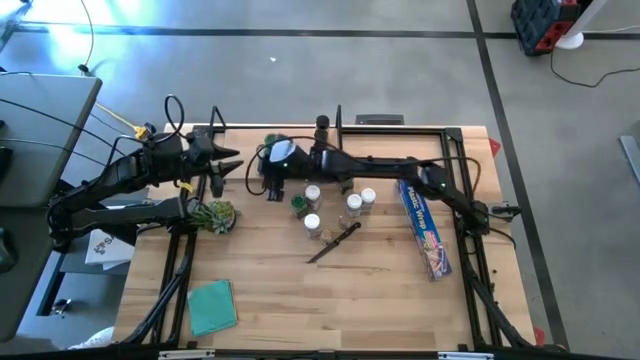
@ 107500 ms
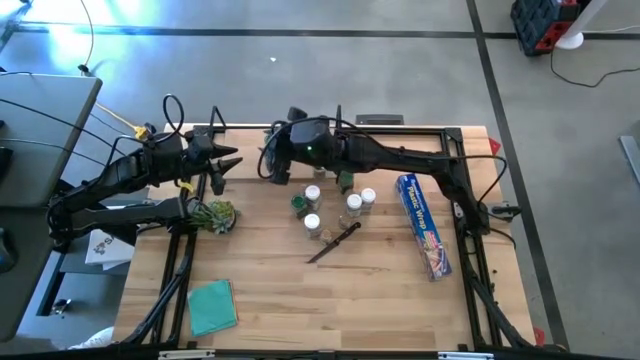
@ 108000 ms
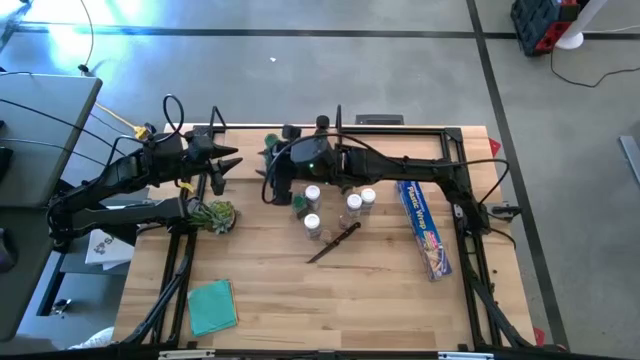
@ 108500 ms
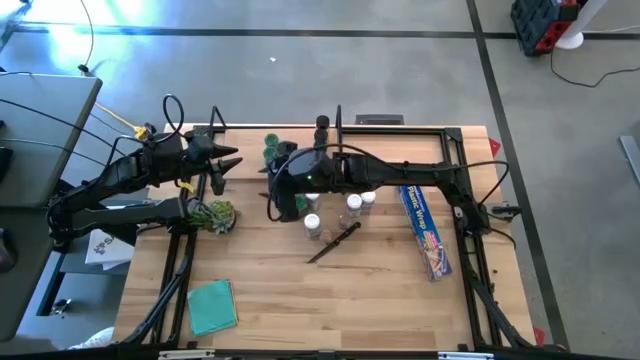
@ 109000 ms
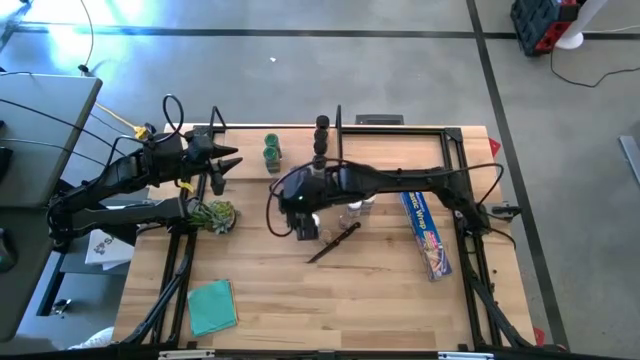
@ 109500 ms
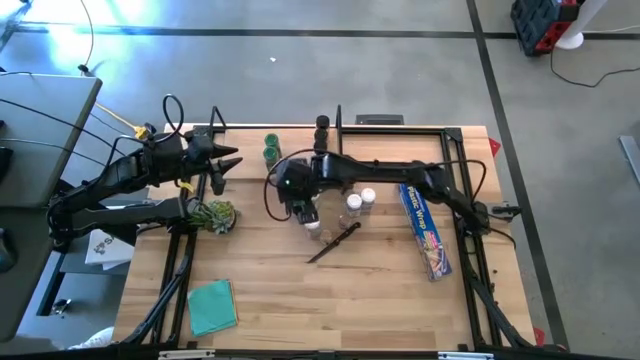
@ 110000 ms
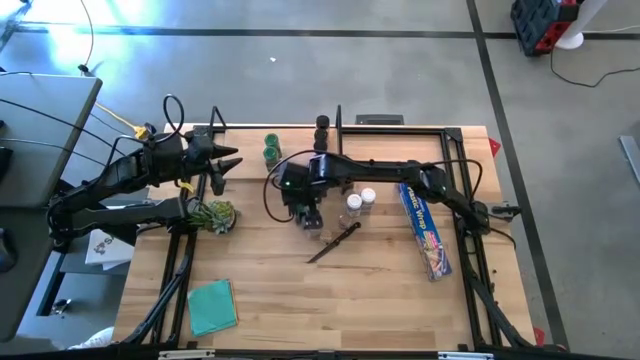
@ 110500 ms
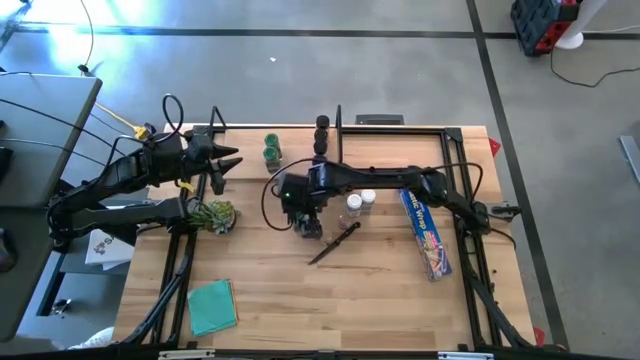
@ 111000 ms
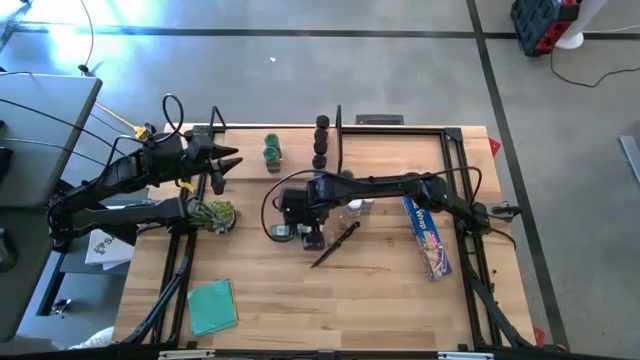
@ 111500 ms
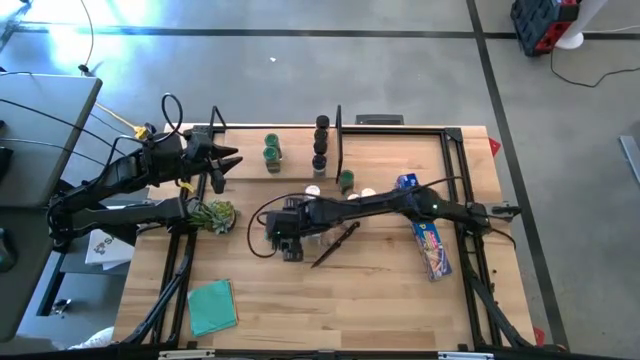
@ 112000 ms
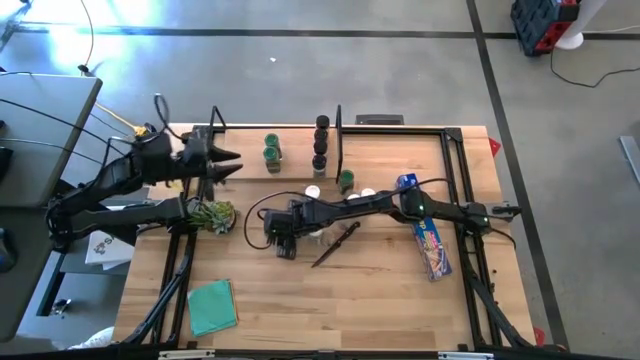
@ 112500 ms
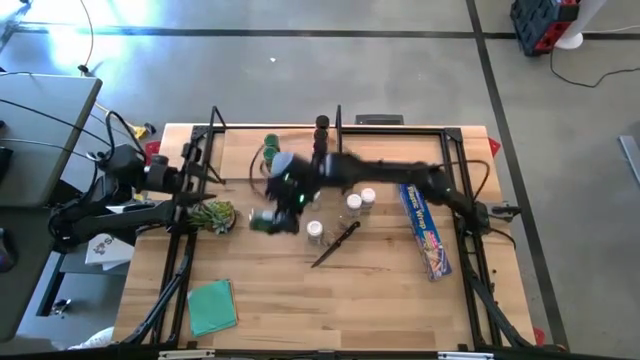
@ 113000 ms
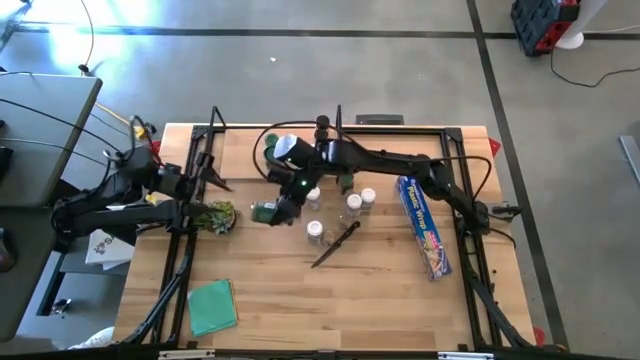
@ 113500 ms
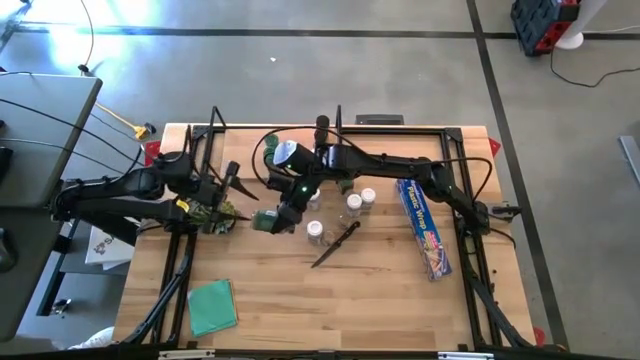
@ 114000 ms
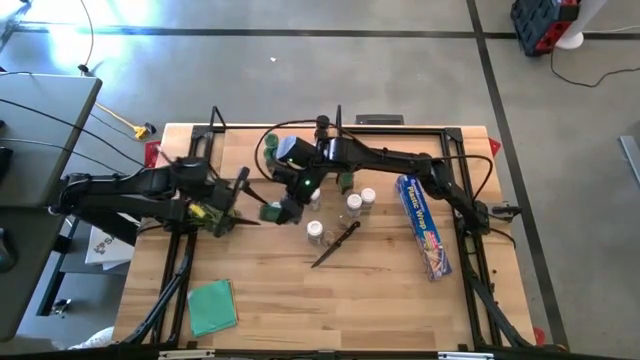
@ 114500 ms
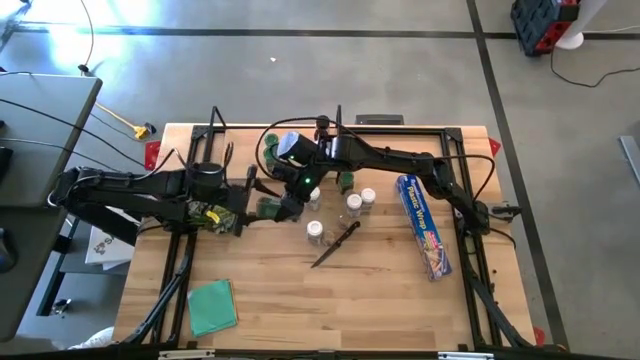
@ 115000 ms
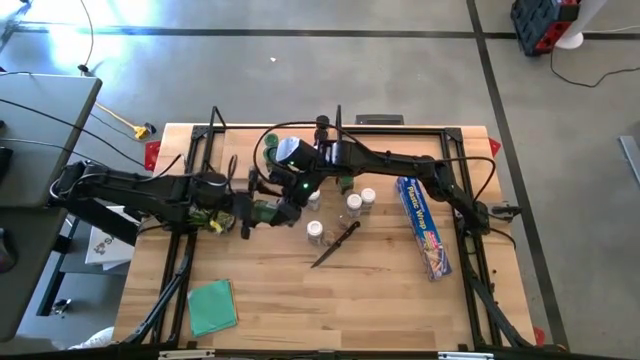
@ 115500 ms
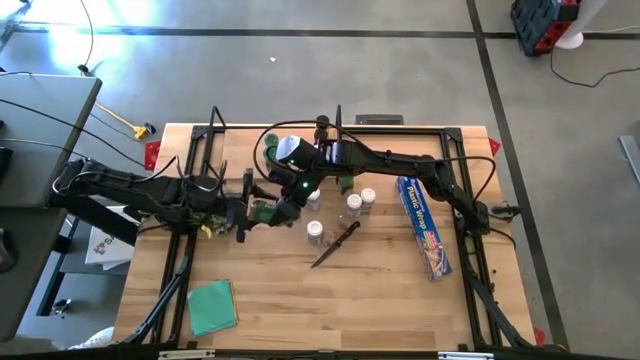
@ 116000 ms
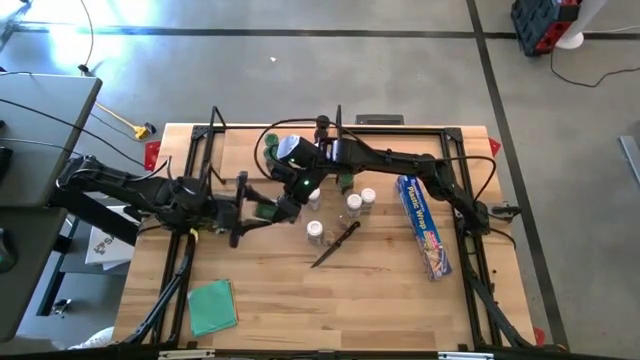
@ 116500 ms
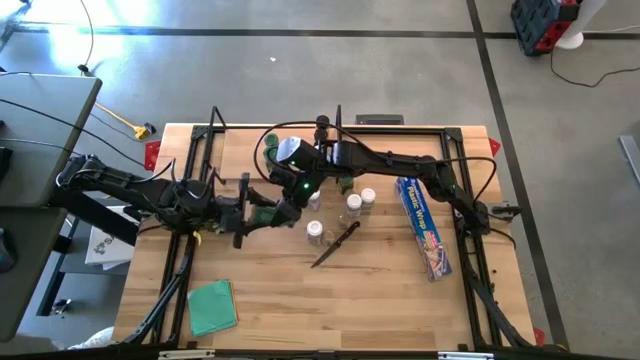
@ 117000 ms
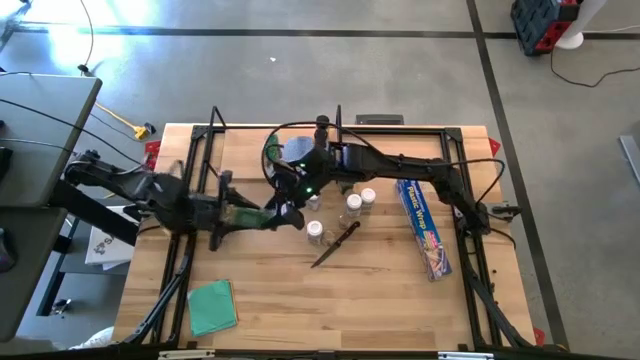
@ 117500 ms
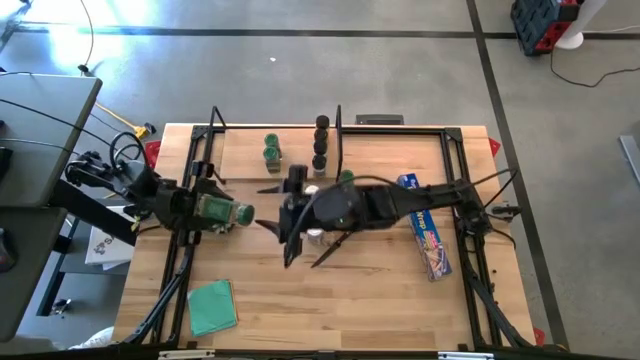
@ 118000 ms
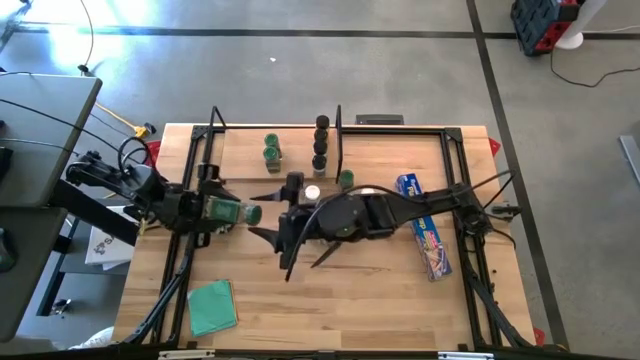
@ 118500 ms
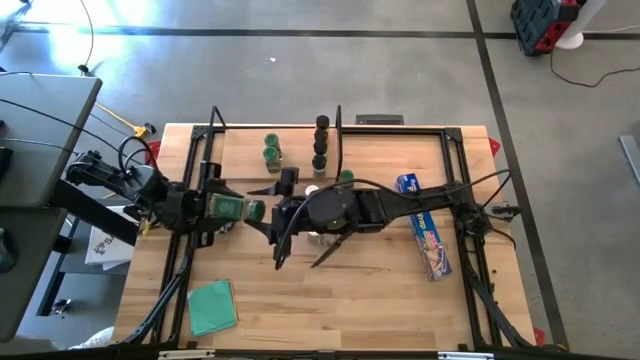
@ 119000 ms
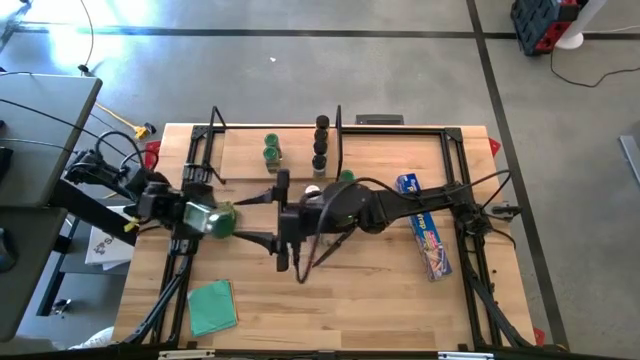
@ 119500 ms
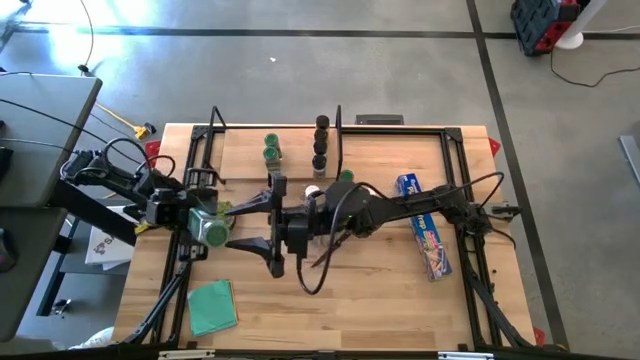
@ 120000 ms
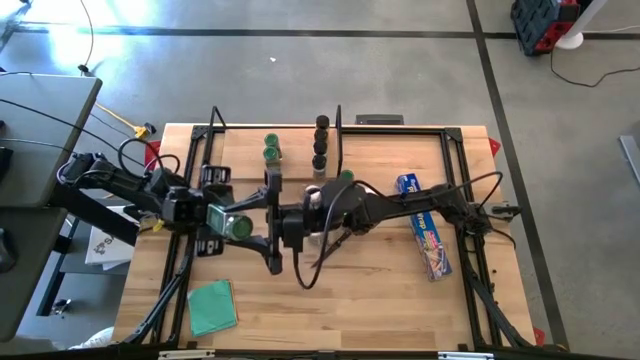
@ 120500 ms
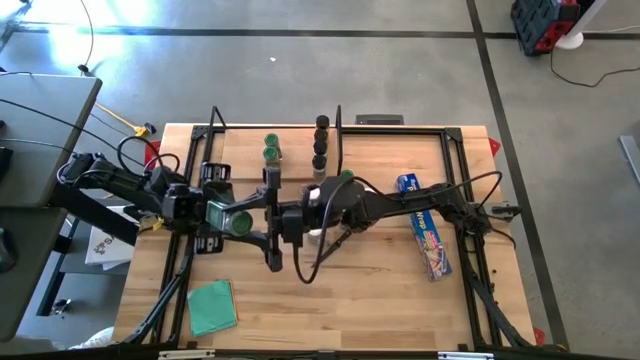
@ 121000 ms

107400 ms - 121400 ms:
Task: Shelf spices
Put the green lid seasoning bottle on the shelf
